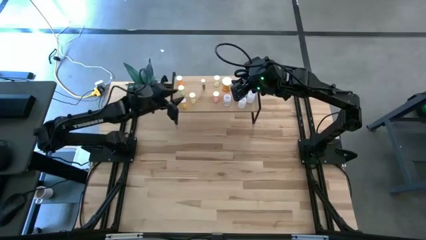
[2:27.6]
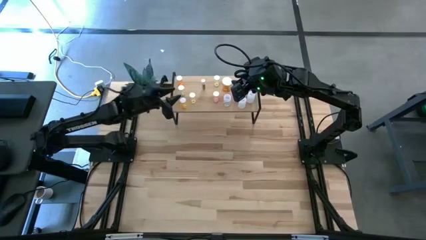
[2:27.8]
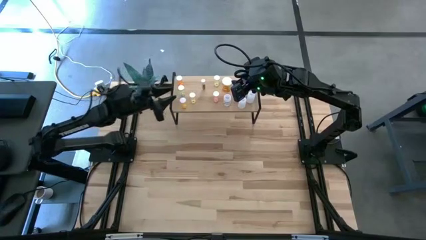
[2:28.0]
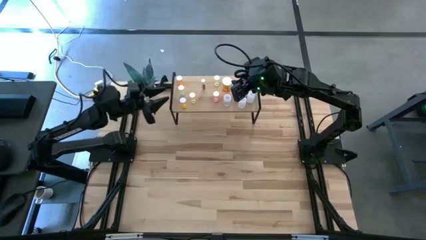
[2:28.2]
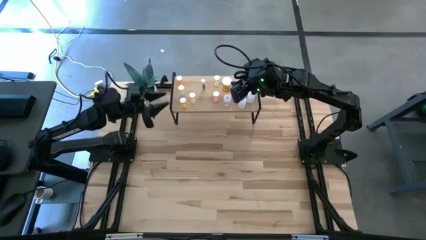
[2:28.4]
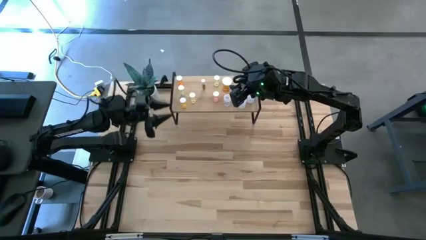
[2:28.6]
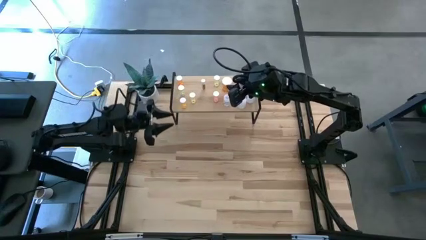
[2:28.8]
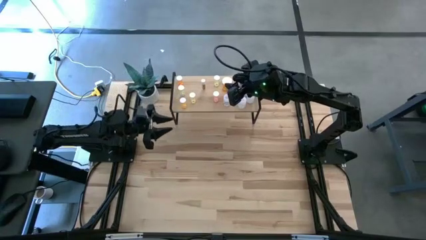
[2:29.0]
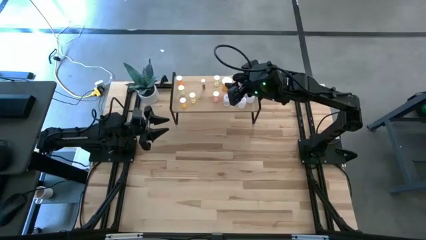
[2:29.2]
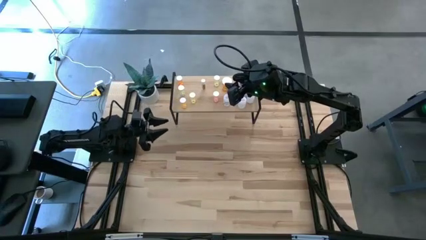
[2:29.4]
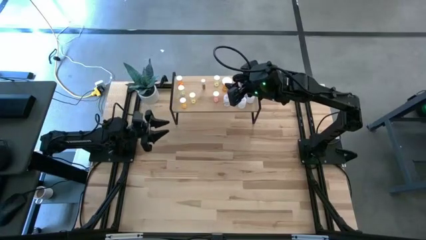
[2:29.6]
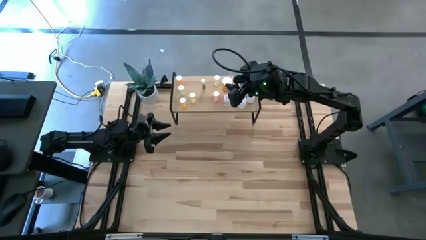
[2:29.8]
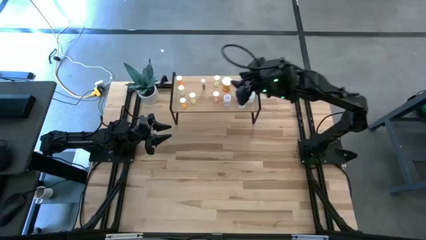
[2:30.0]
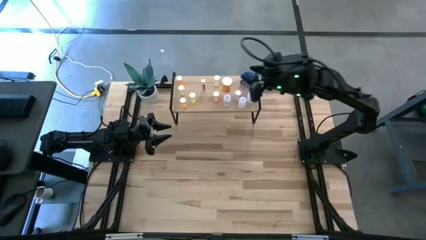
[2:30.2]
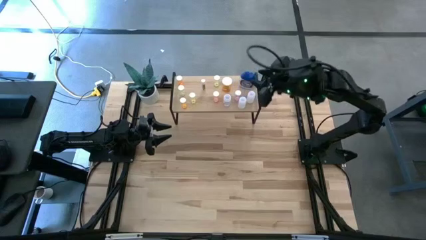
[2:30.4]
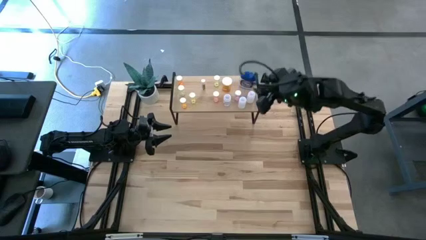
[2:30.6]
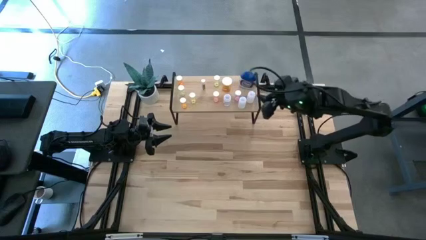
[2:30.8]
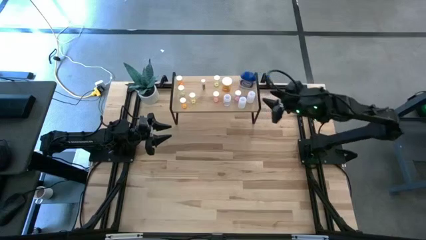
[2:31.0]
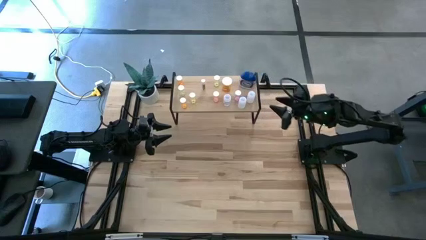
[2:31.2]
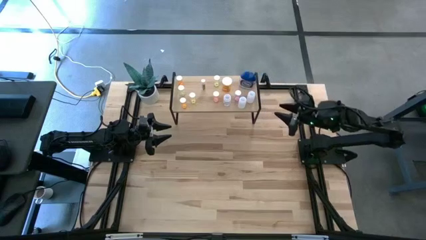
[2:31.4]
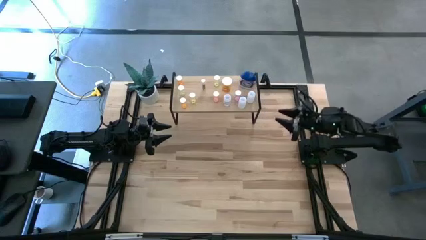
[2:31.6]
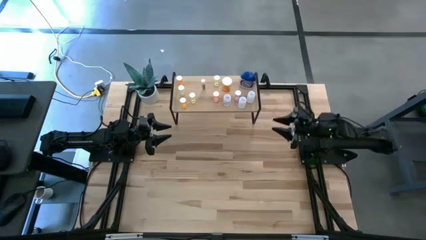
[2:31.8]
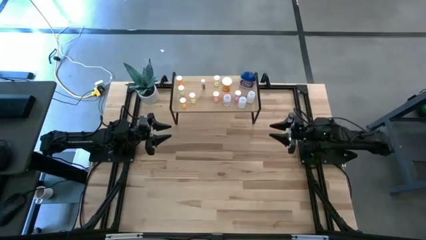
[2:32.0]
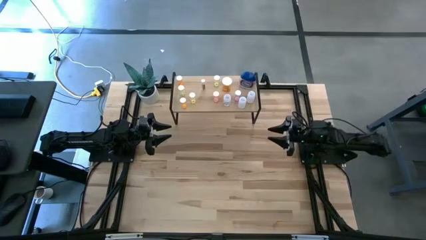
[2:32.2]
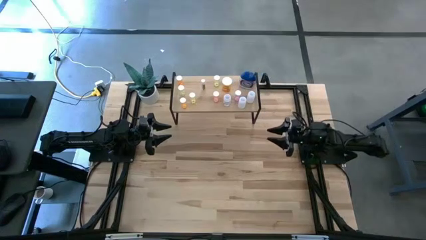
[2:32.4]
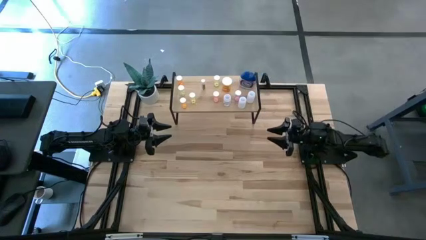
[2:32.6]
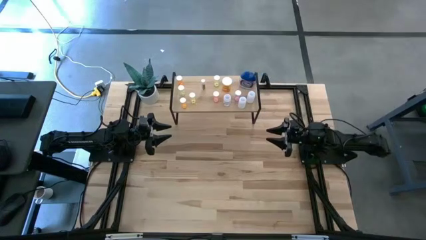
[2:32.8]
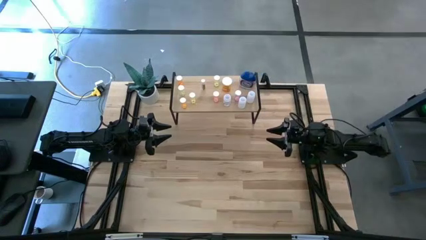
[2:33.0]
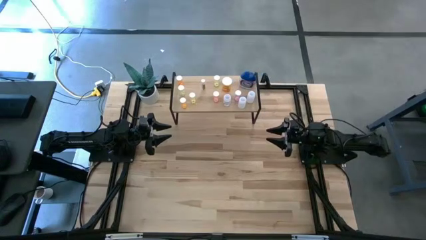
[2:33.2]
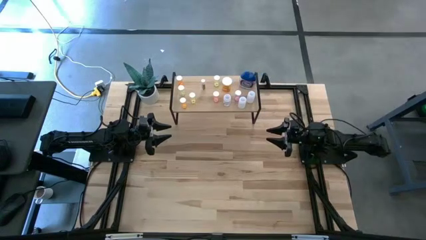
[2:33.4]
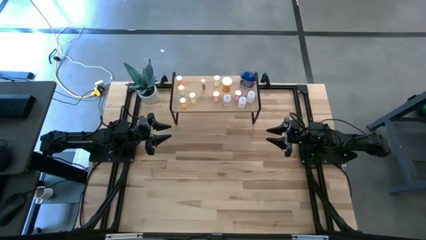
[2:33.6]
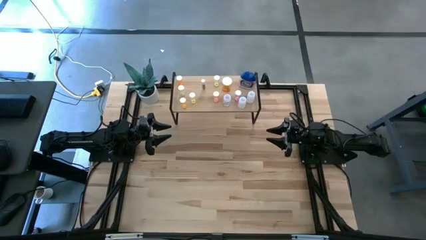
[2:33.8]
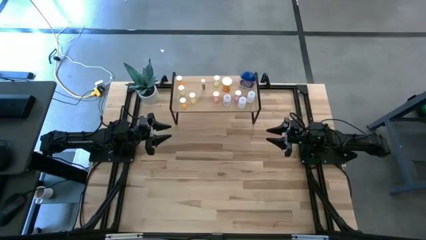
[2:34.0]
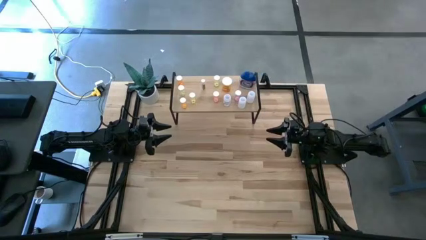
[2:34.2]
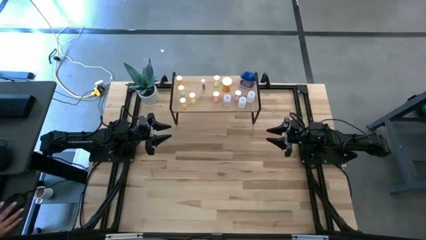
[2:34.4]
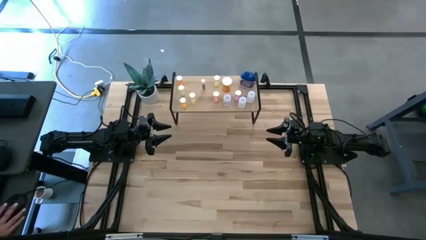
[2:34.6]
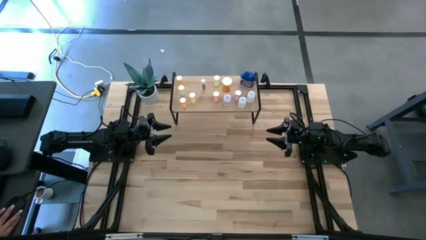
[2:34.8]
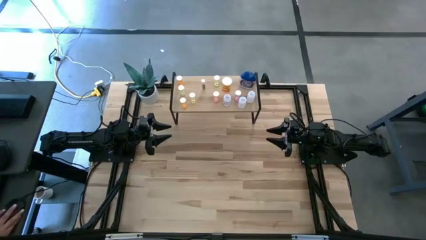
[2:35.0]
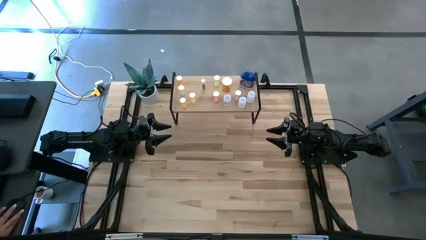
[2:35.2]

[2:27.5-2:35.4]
Task: Pick and place medicine bottles onto shelf by color
Return to Home Position

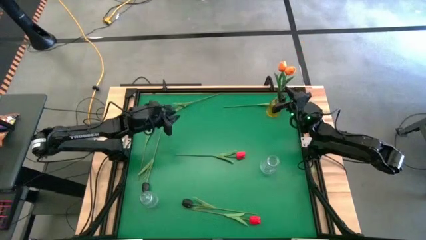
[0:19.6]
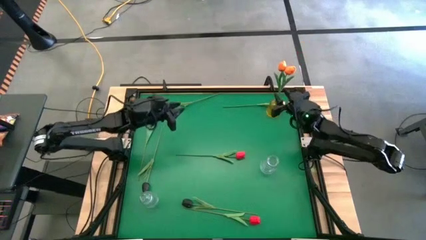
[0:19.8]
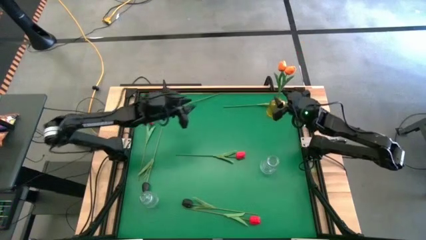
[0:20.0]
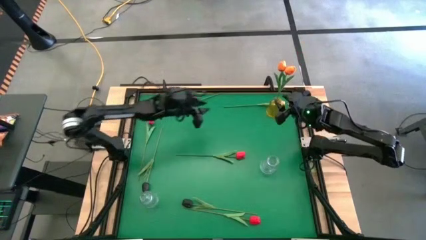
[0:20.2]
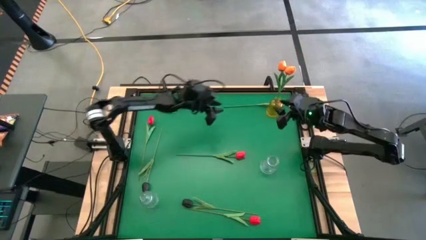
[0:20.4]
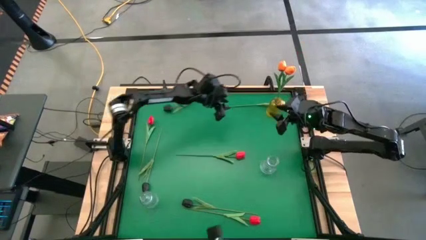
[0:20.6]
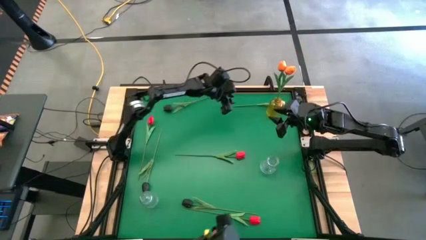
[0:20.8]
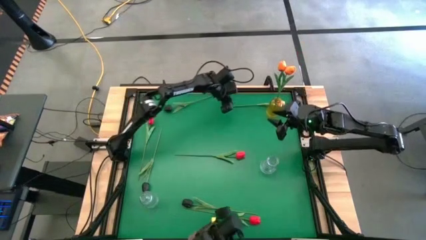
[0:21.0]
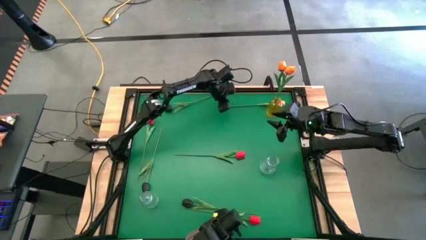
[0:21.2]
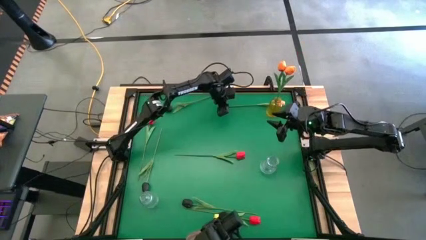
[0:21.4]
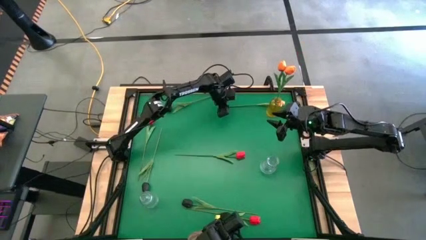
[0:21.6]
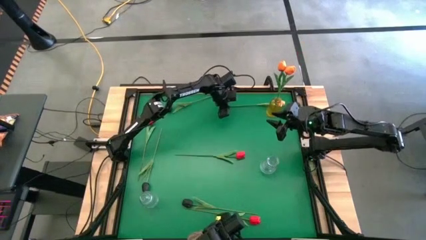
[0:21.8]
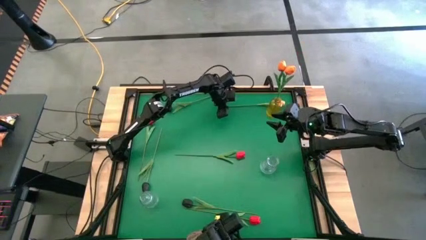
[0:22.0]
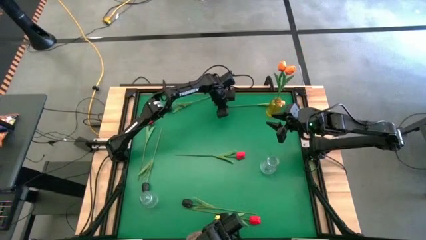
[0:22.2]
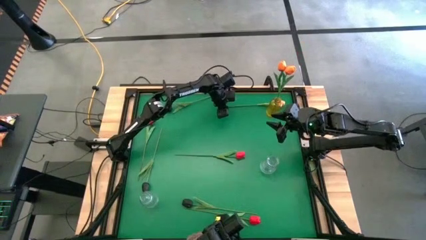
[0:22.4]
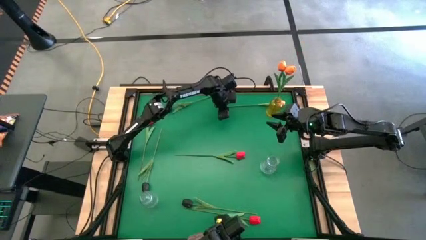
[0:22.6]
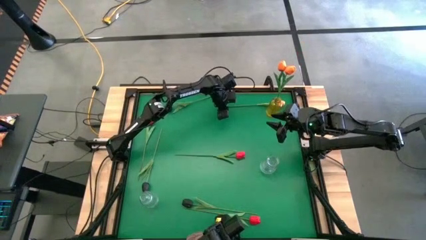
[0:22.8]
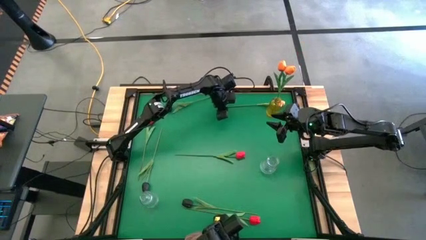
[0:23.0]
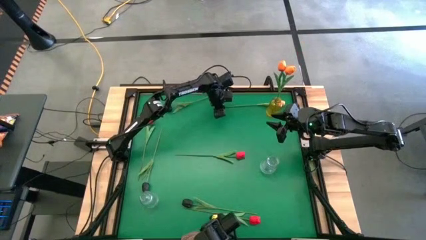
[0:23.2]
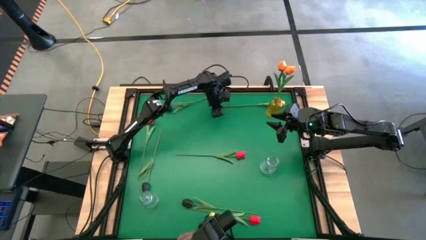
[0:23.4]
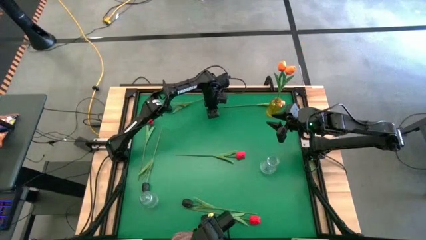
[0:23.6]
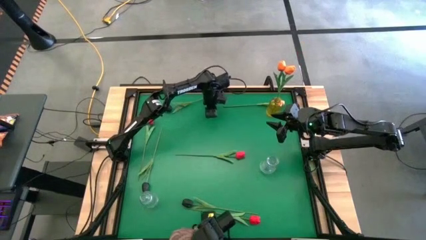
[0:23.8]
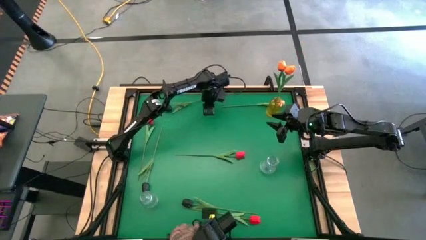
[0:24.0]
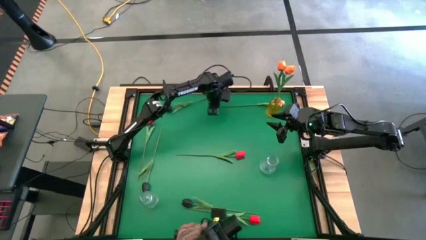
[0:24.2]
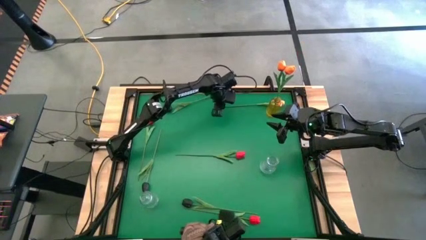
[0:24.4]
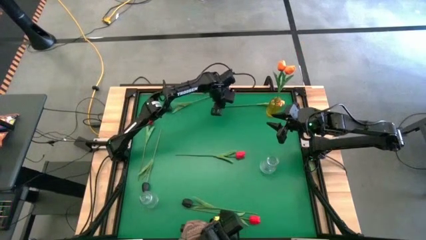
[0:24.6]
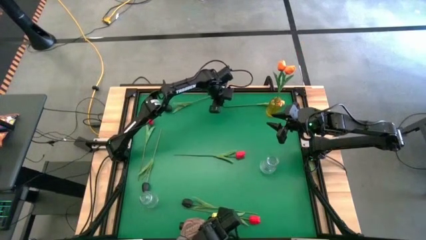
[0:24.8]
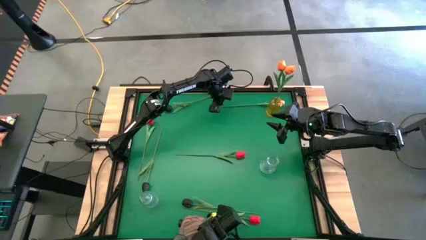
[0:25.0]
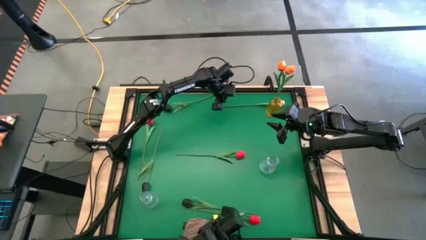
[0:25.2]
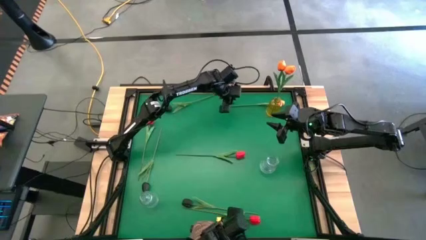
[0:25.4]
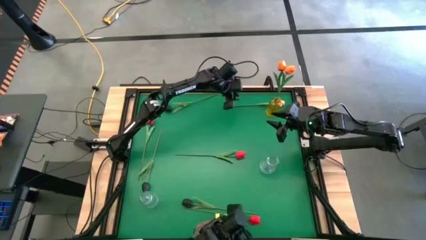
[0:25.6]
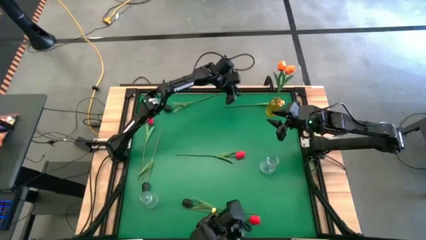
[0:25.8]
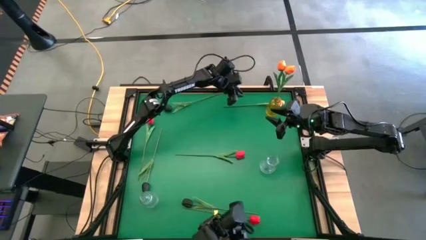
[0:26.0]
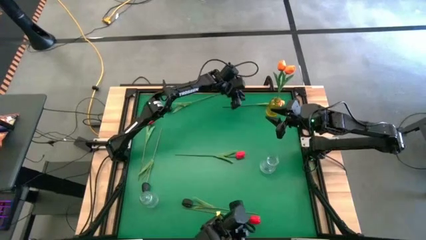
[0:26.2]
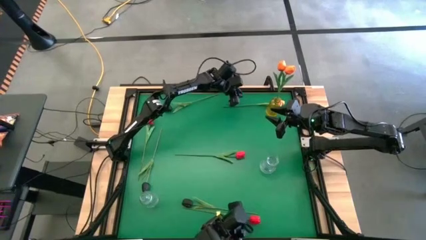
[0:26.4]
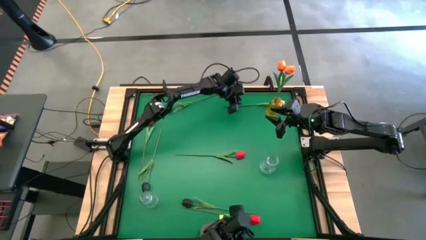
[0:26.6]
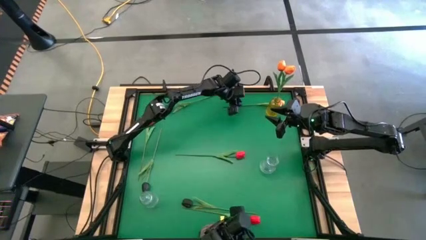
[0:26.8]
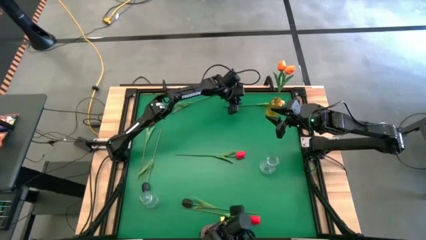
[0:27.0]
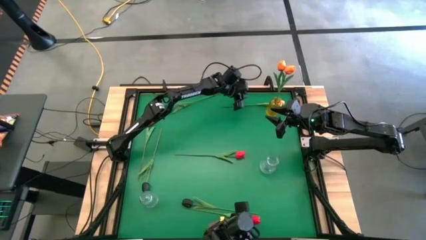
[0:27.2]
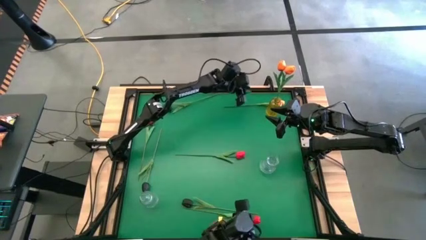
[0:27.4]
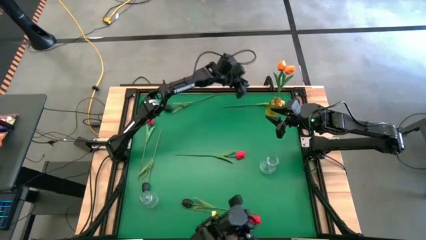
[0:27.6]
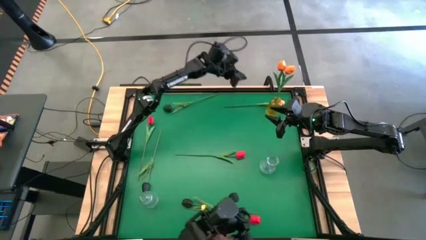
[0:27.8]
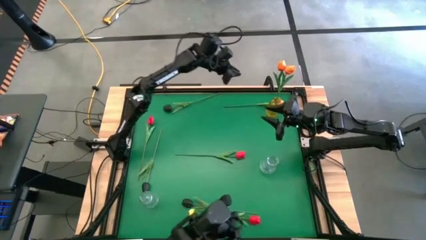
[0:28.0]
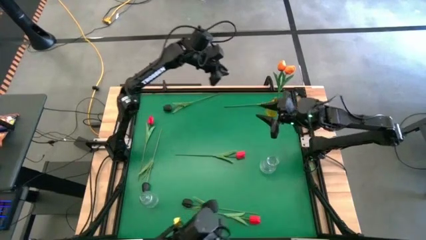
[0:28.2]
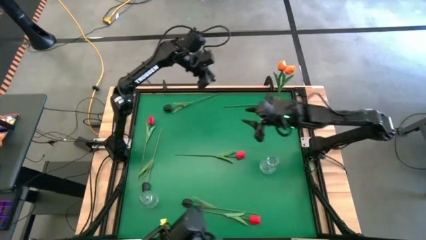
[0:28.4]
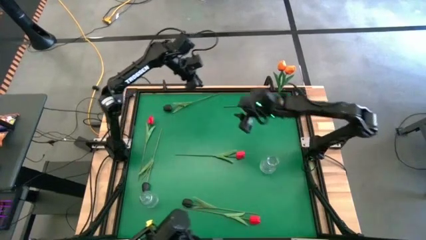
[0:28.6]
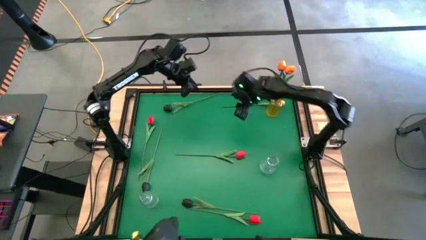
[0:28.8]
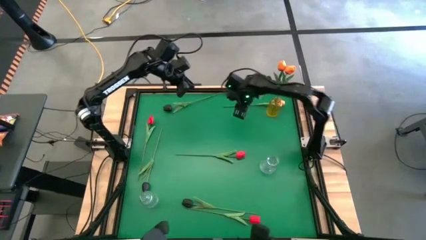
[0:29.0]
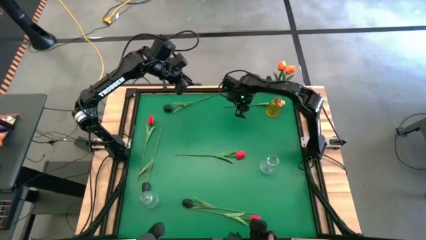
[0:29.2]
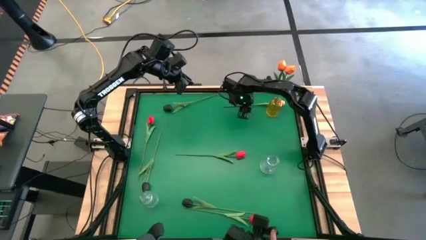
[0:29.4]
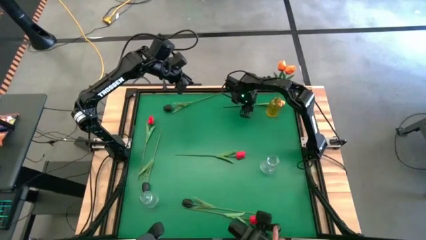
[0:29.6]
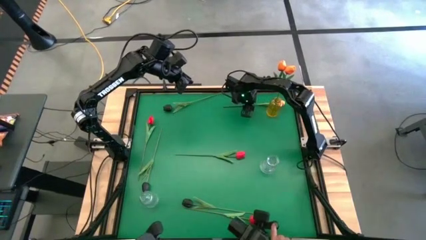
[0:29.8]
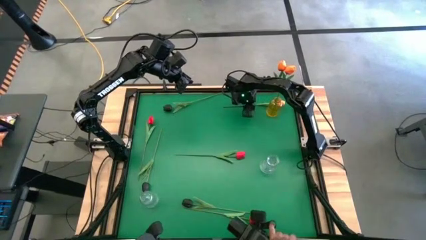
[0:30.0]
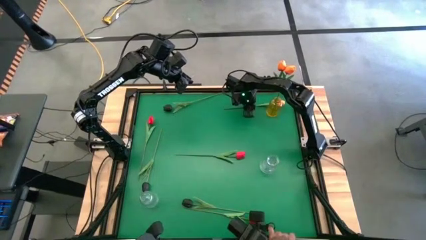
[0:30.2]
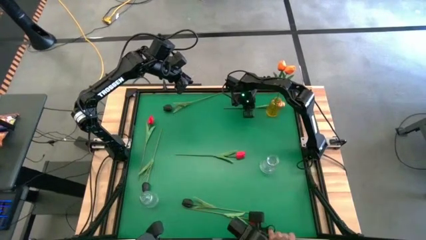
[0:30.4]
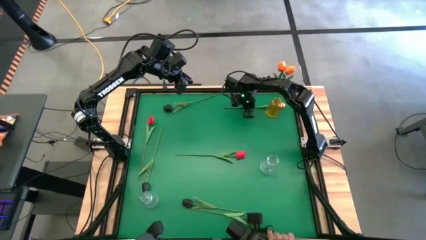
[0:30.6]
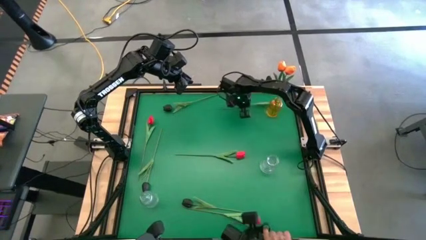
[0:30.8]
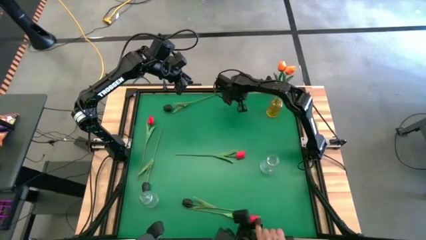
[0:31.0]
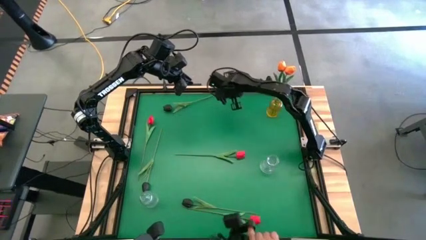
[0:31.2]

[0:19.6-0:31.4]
Task: Sort flowers into vase by color
Put the orange tulip into the yellow flower vase
